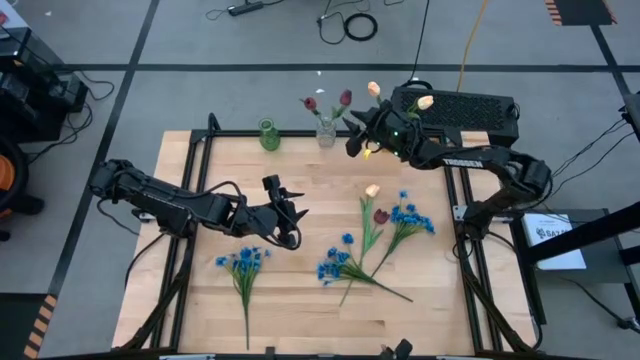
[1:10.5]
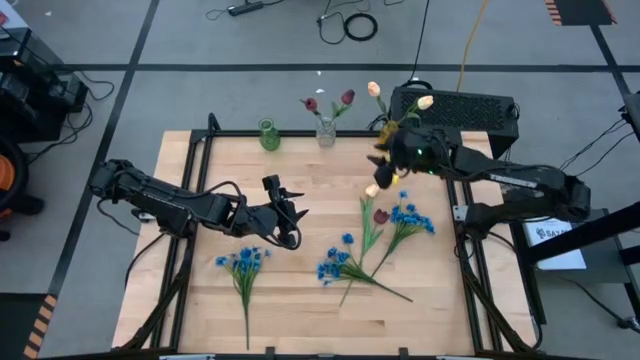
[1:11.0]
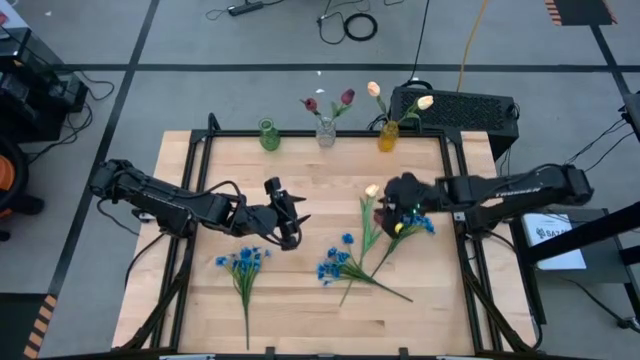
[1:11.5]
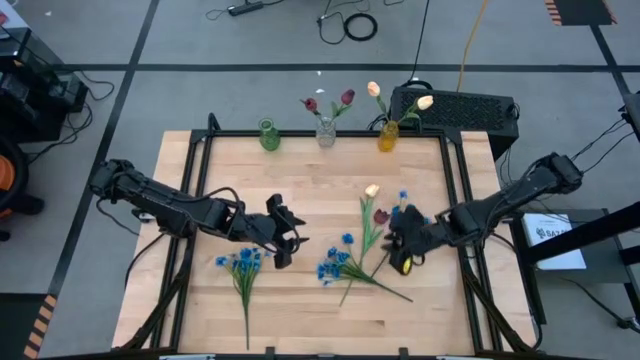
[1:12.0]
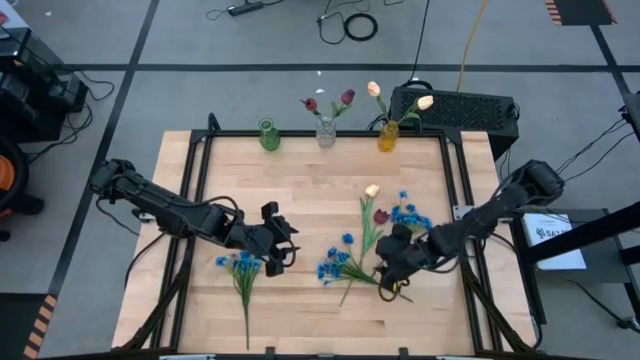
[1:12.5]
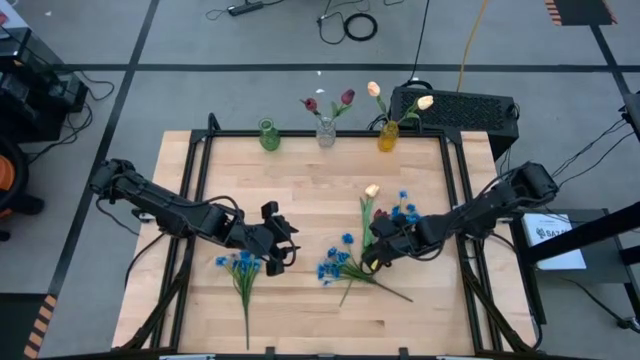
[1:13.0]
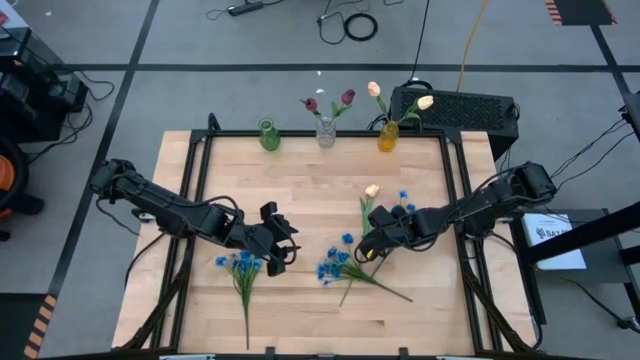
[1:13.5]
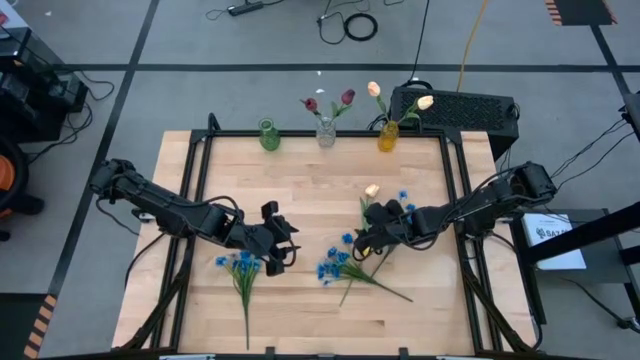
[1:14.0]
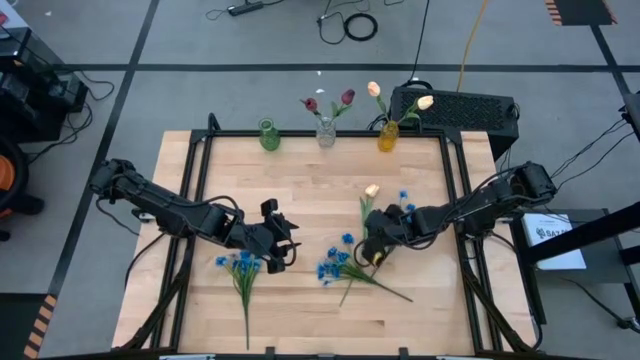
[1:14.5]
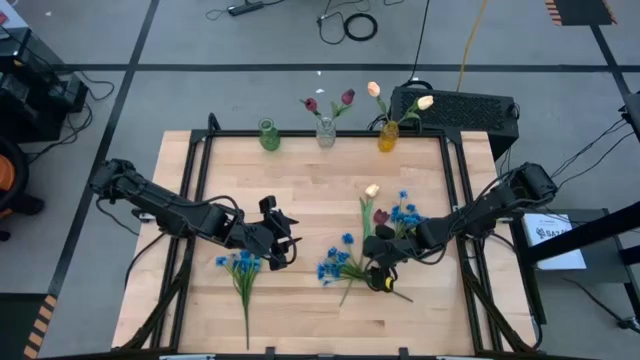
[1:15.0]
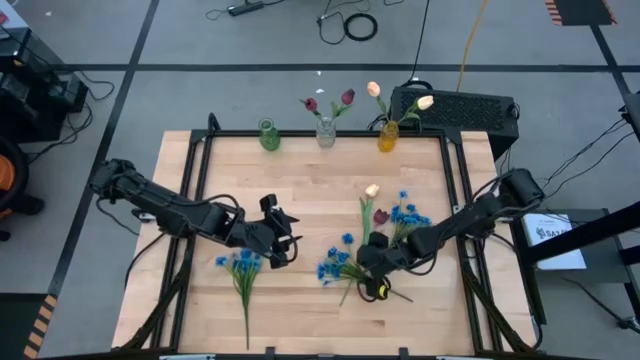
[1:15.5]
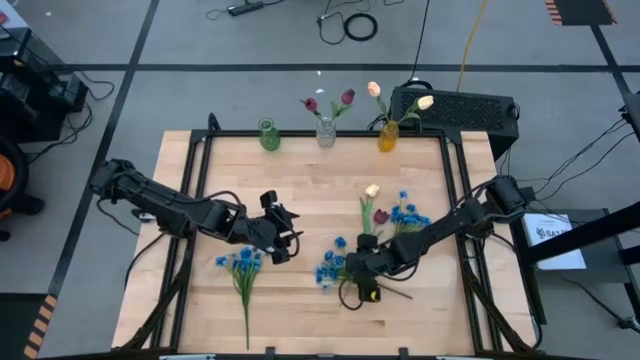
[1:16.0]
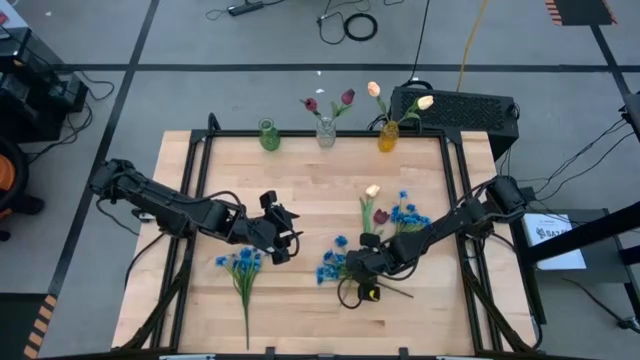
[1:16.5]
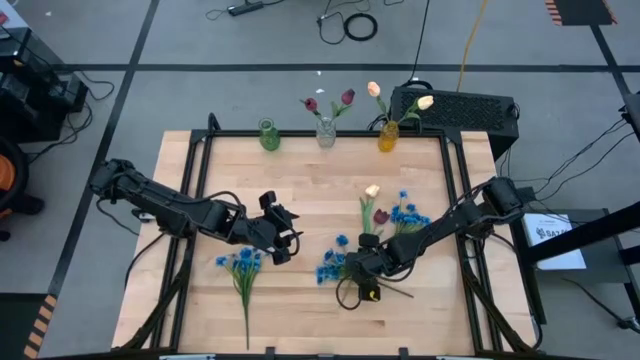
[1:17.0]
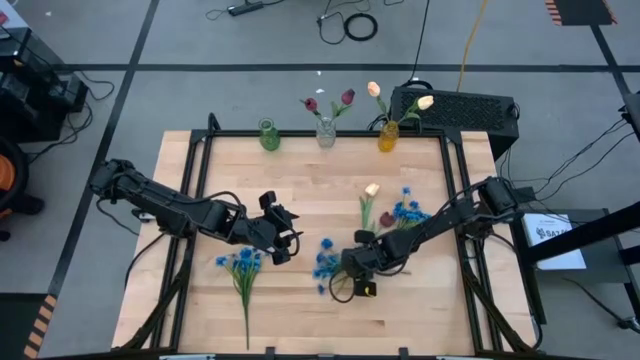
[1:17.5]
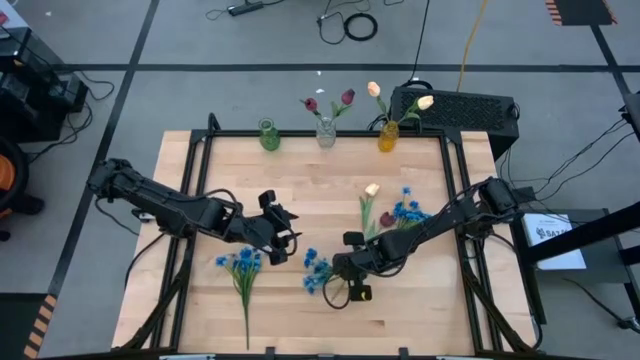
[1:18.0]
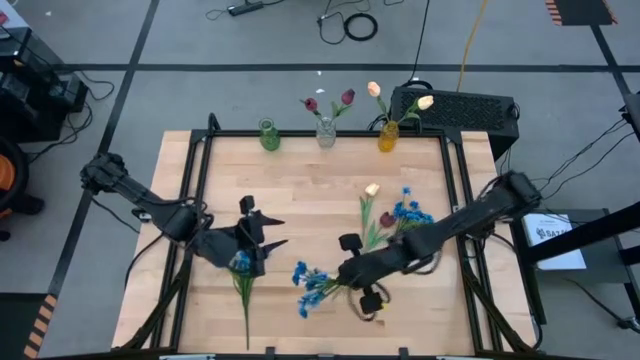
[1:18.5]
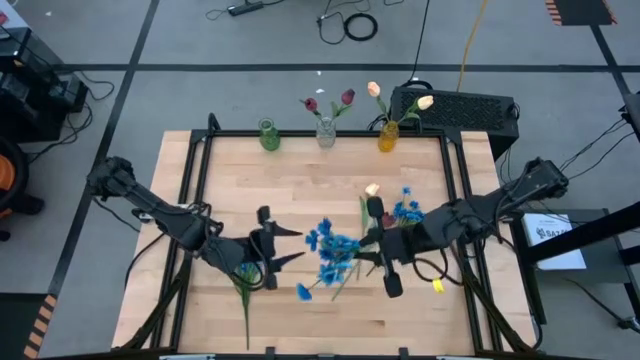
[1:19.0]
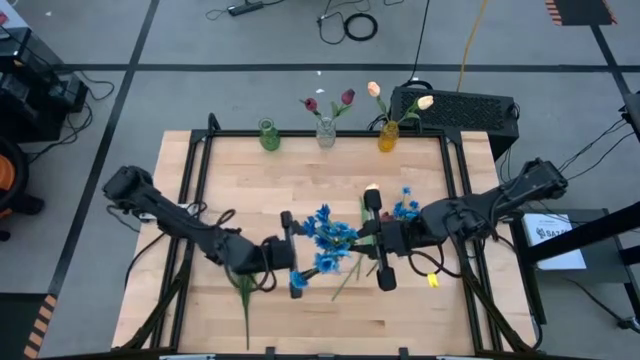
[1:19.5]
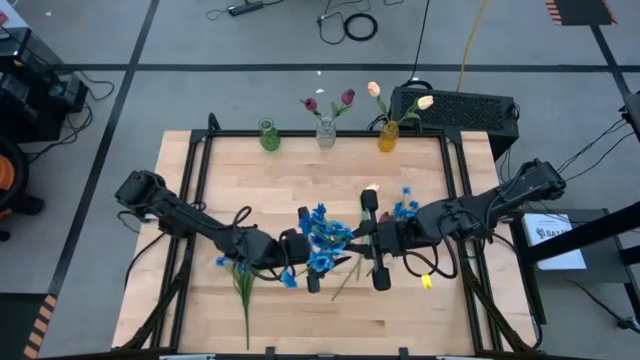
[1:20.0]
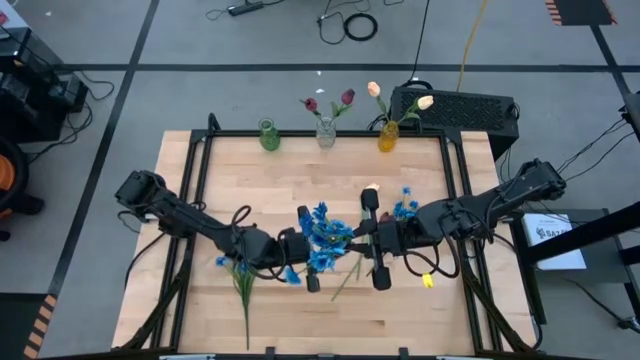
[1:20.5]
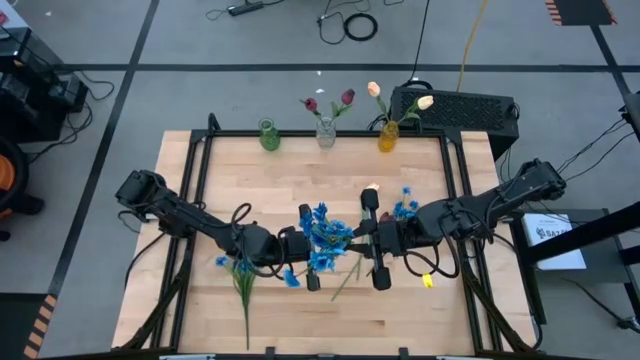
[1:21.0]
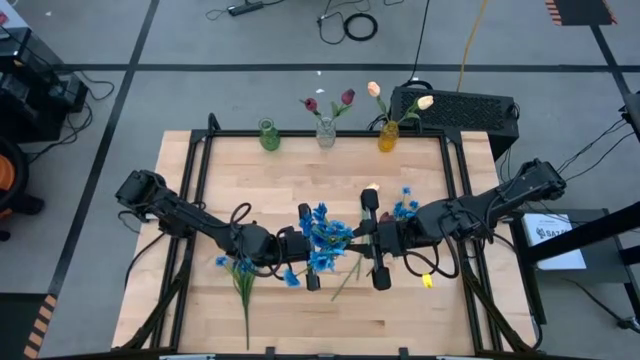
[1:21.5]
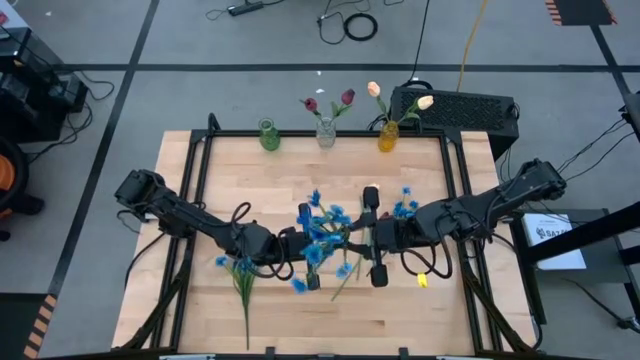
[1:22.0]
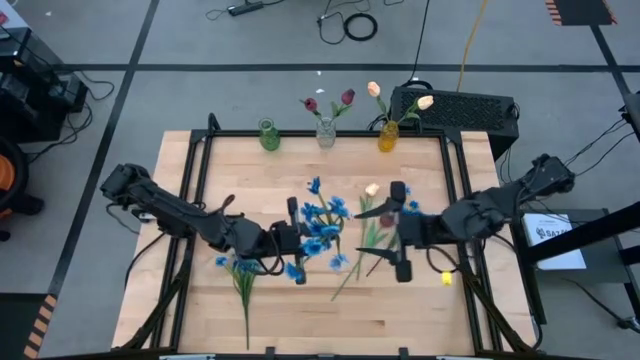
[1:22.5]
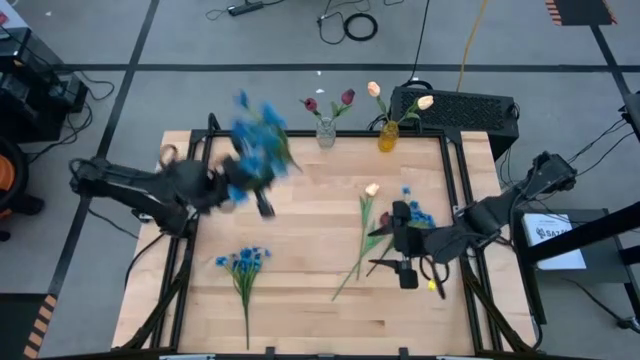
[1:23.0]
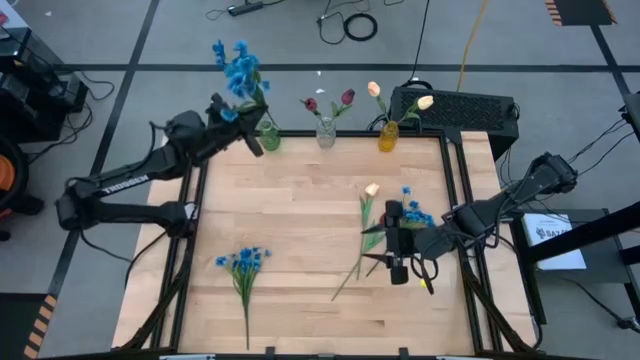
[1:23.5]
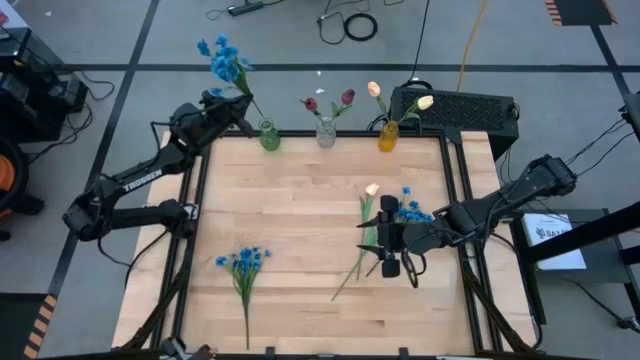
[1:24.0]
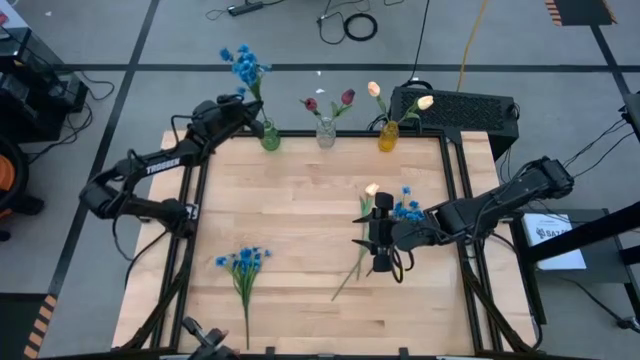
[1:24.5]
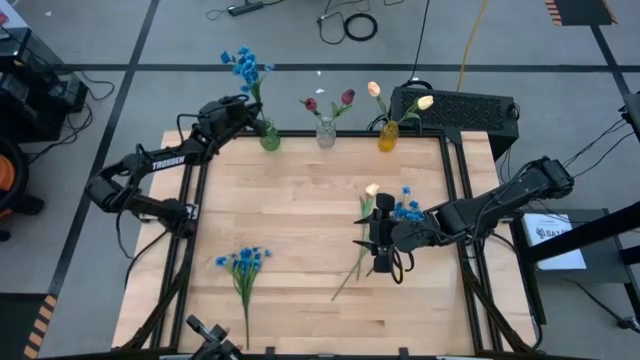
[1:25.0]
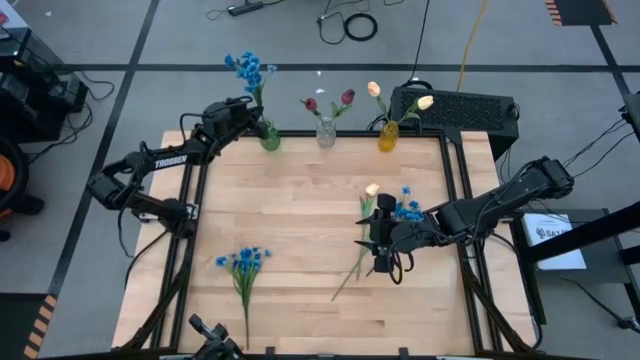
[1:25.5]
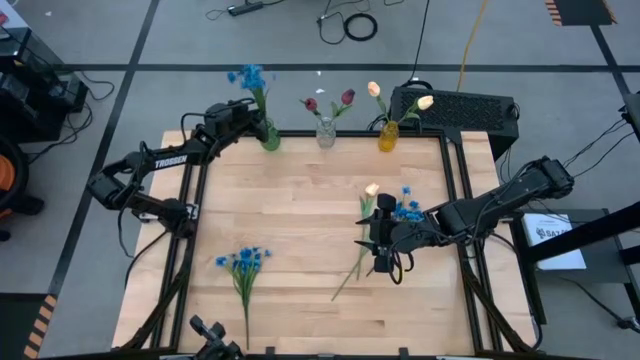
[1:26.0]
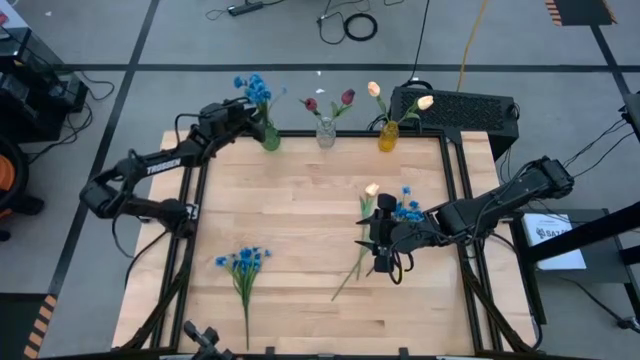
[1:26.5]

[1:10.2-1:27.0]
Task: Sort flowers into vase by color
Put the center blue flowers into the green flower vase

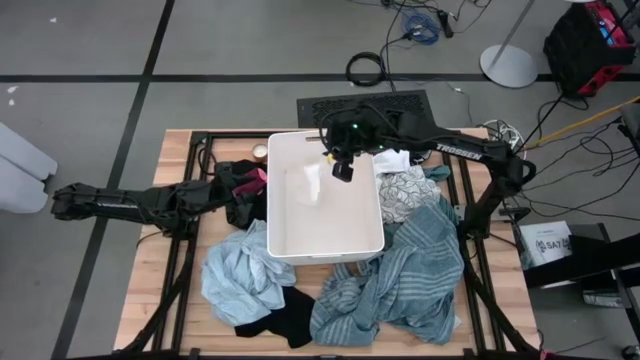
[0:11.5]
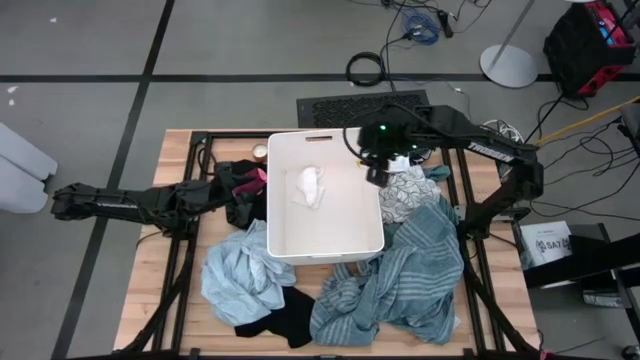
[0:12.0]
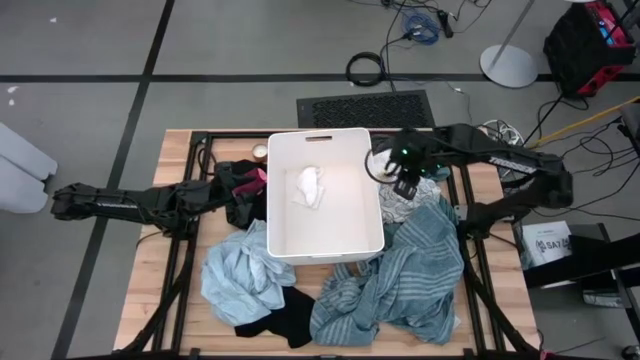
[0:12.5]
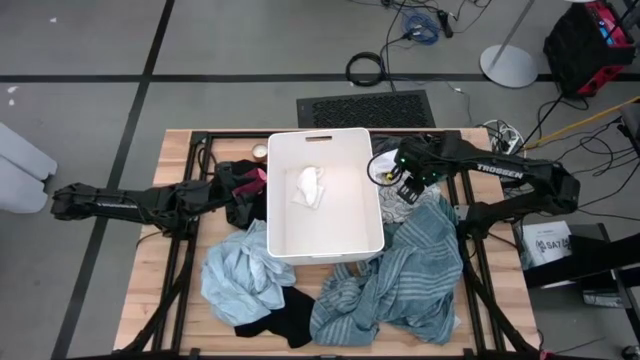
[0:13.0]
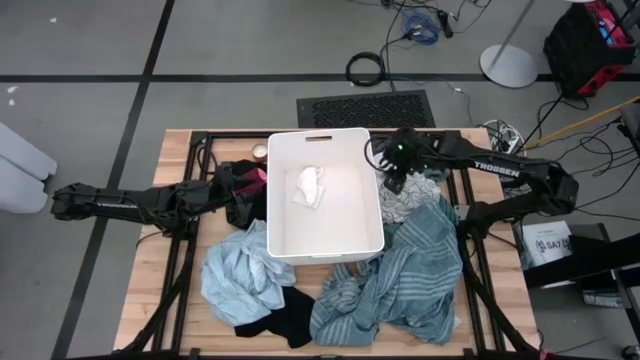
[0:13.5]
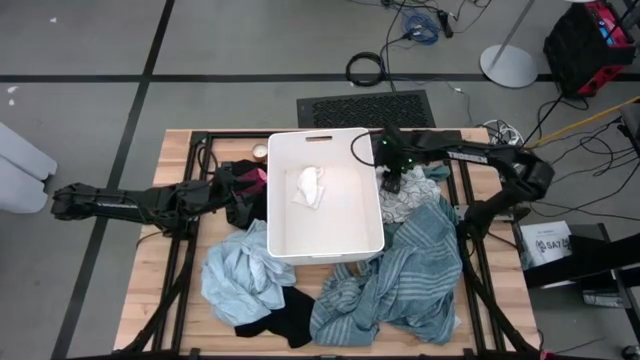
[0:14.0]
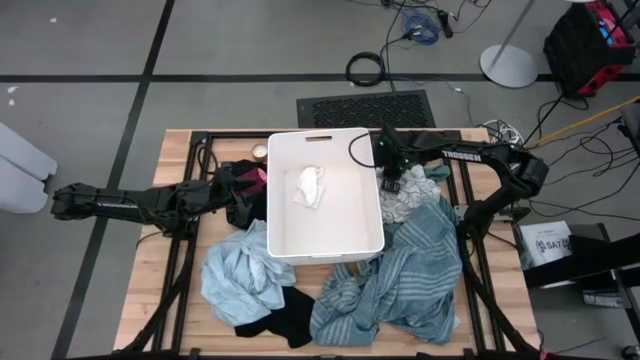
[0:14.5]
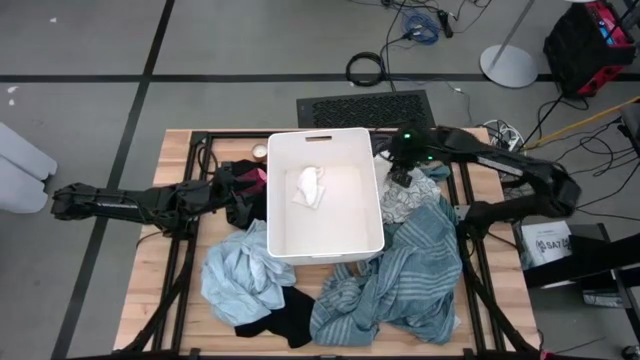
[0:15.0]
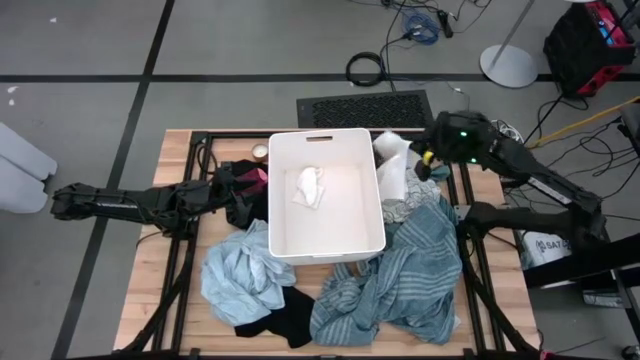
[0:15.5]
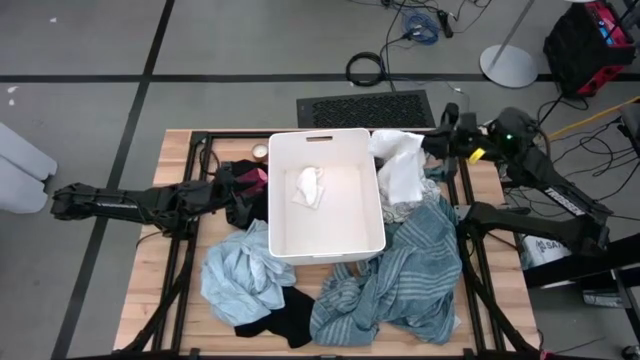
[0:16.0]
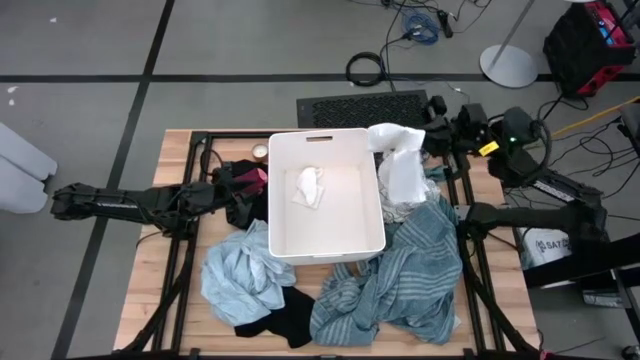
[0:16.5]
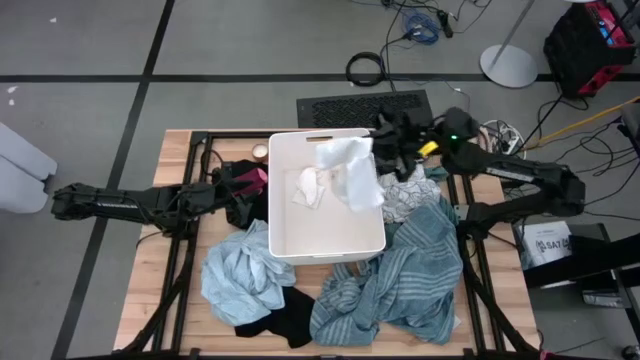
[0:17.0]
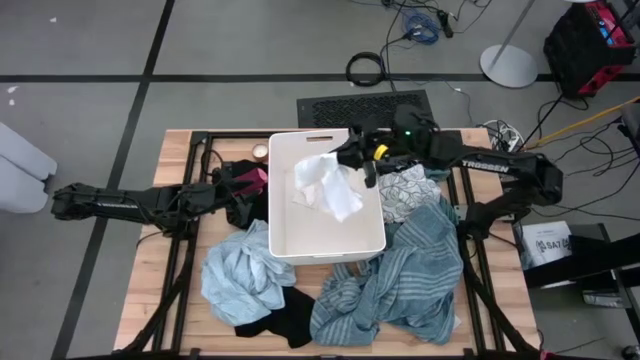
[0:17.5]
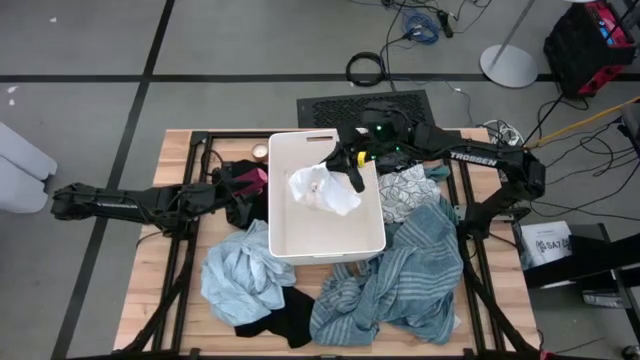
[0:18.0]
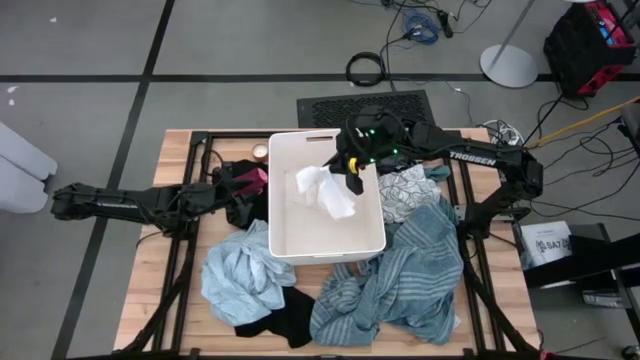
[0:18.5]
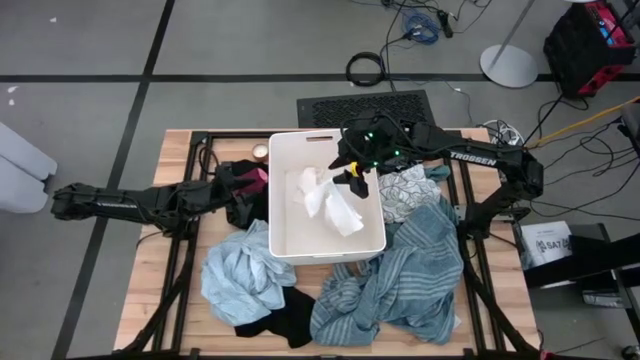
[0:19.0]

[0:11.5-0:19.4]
Task: Sort clothes
Put the shorts into the laundry bin
